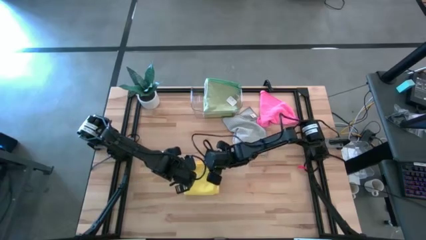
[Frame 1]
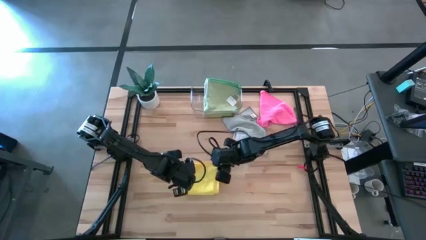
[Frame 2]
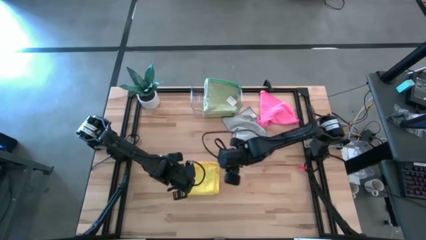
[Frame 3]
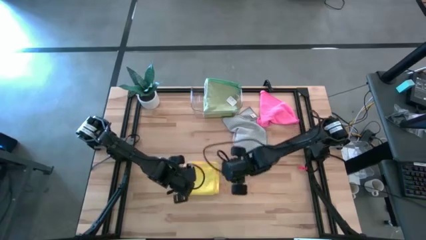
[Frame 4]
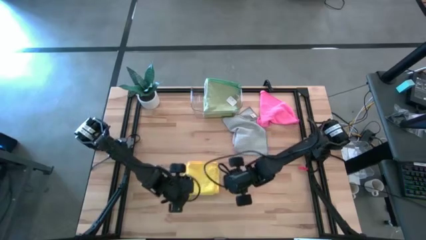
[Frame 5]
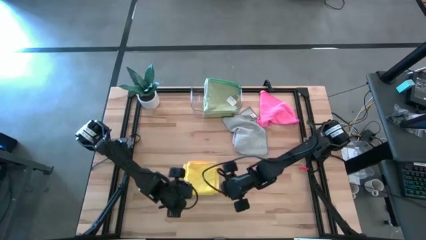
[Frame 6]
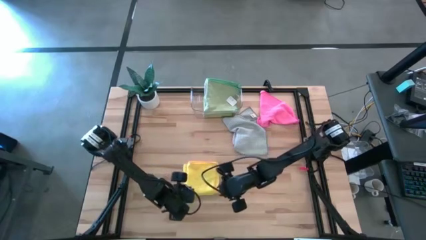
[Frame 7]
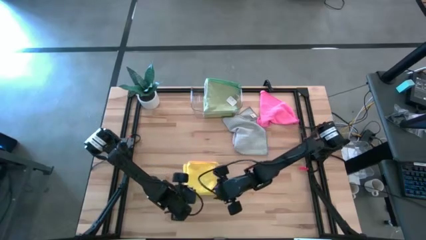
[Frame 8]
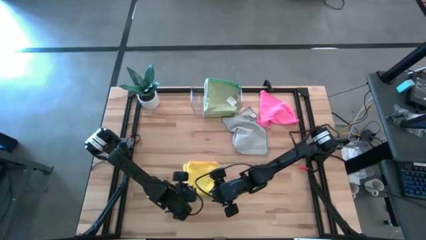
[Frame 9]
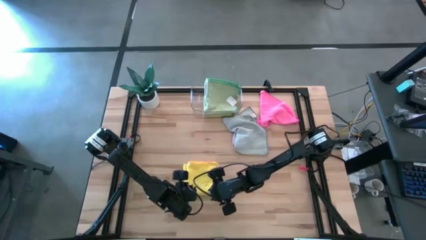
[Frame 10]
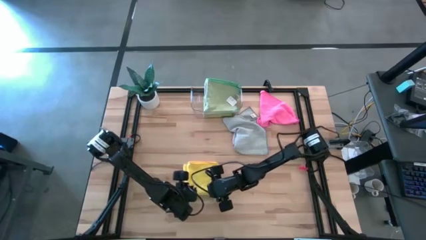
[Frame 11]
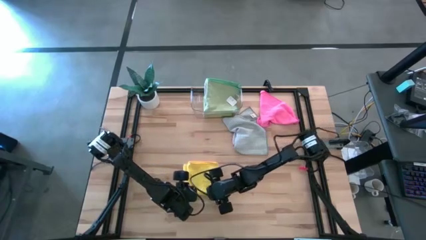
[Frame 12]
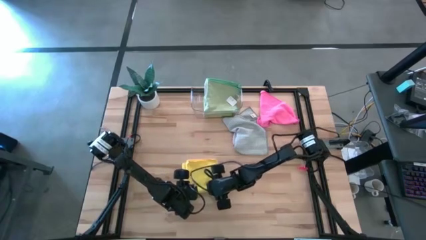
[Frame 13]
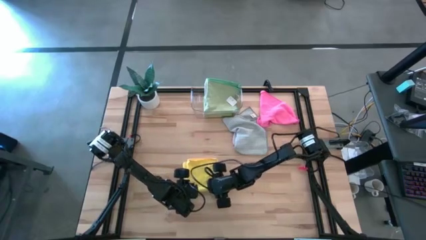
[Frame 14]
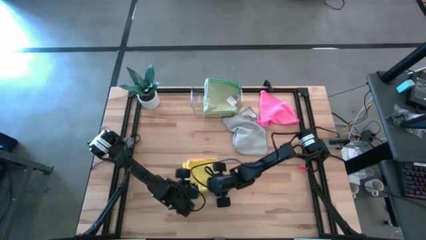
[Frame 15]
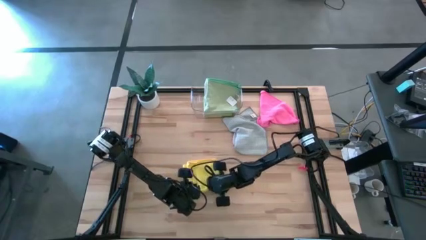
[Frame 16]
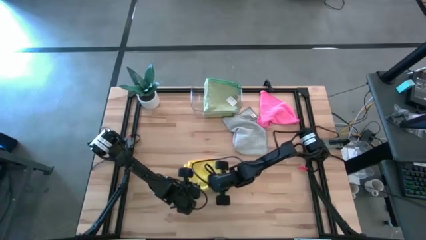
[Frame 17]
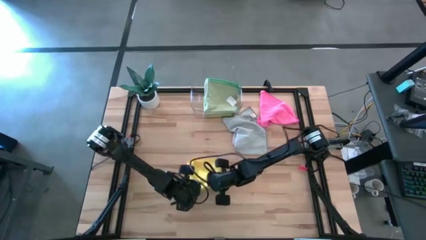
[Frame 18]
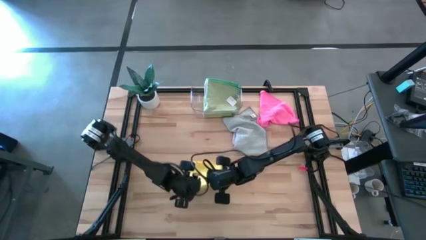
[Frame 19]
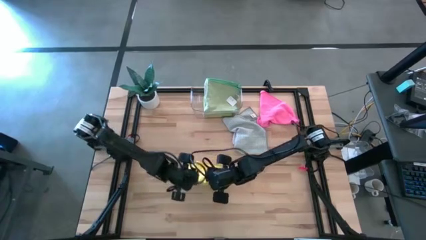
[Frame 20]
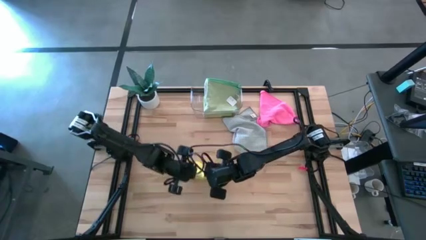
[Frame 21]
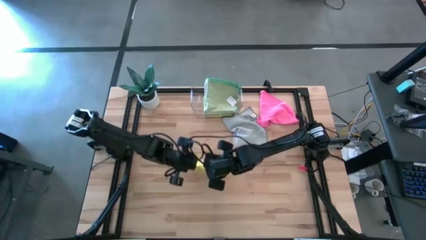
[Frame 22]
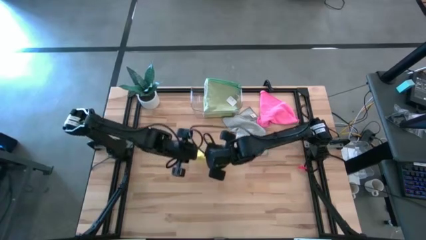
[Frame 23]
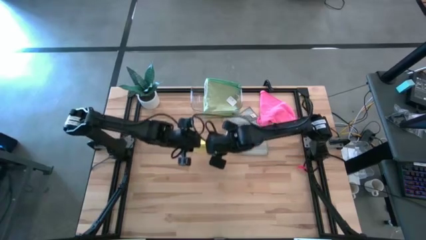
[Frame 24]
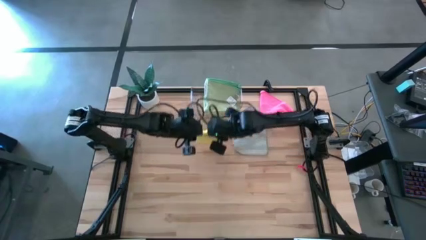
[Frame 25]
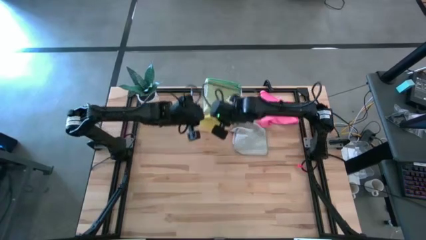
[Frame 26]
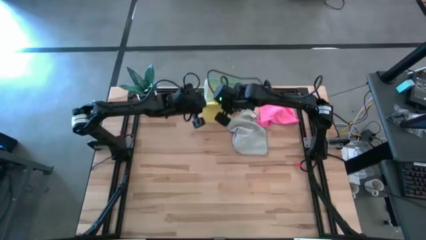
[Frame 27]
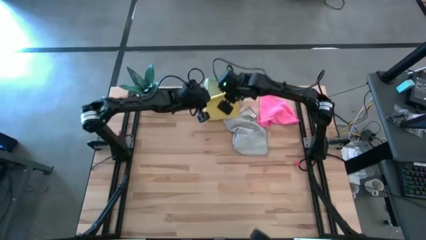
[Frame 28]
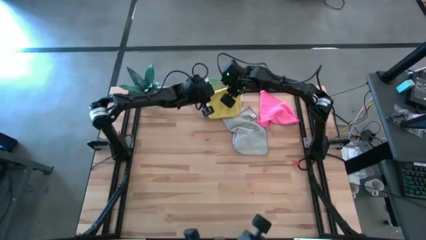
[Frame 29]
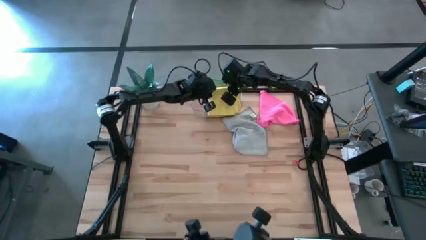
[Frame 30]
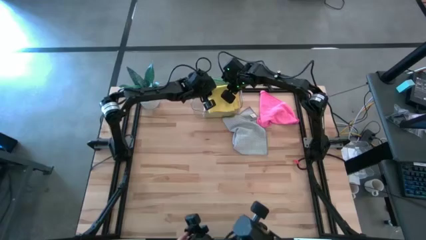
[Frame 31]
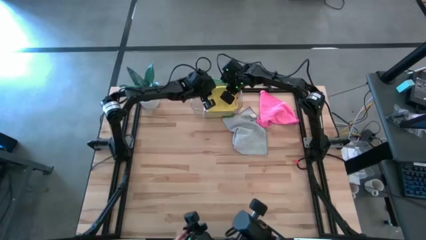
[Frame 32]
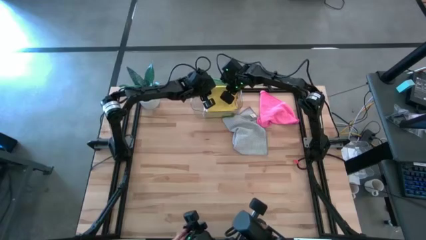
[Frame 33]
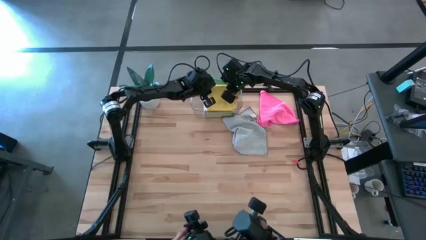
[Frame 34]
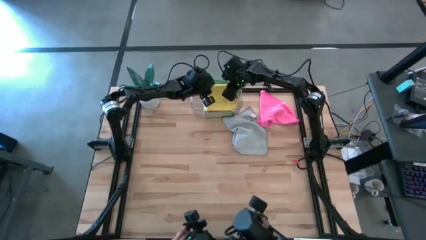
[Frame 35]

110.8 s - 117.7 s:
Task: Fold microfiber towels
Put the yellow microfiber cloth into the transparent bin

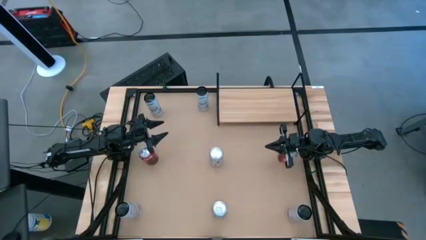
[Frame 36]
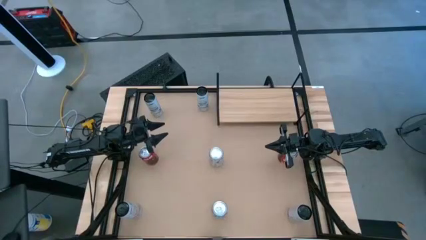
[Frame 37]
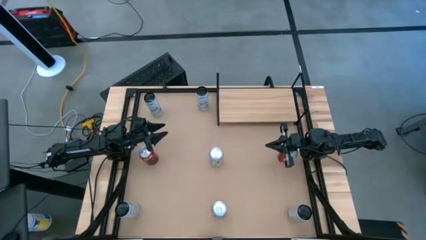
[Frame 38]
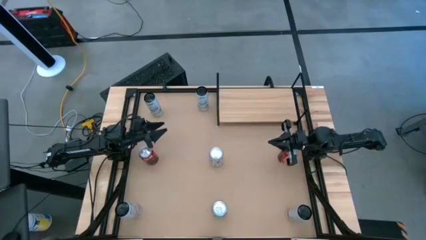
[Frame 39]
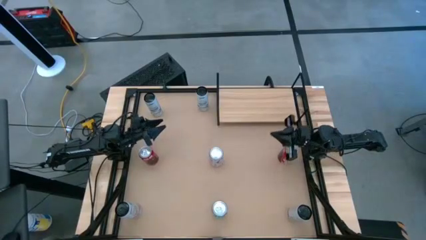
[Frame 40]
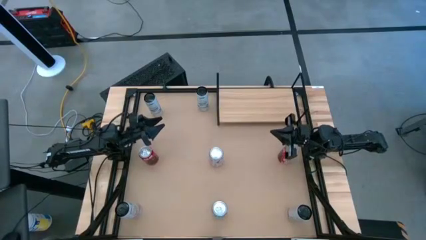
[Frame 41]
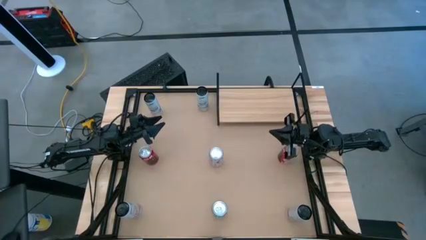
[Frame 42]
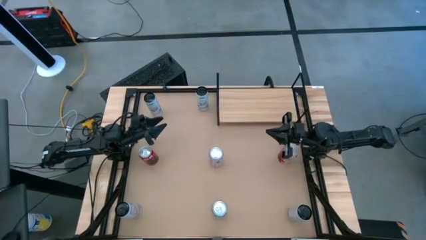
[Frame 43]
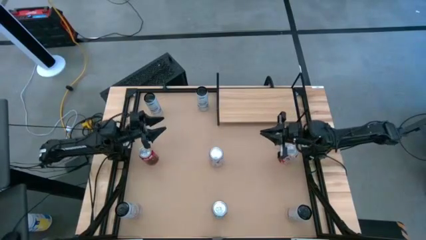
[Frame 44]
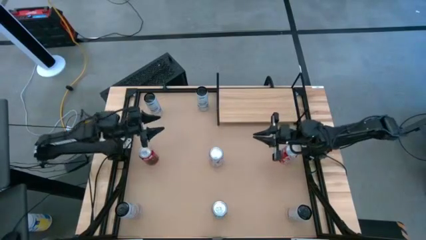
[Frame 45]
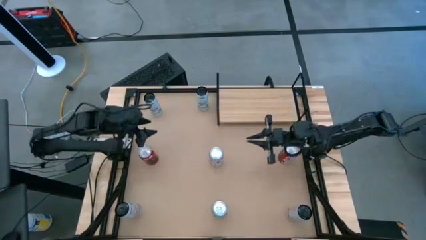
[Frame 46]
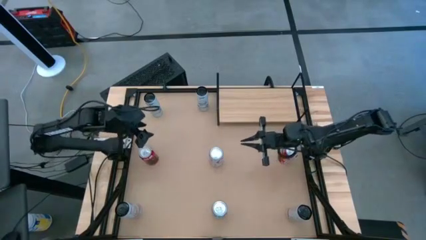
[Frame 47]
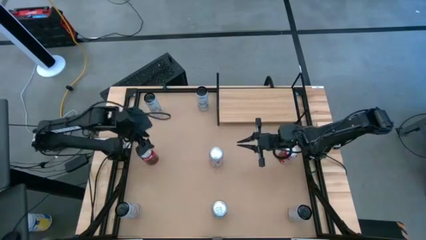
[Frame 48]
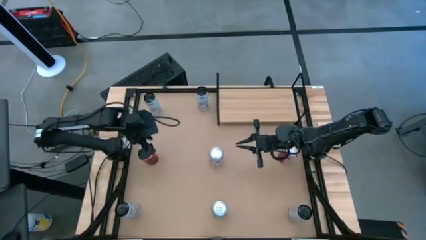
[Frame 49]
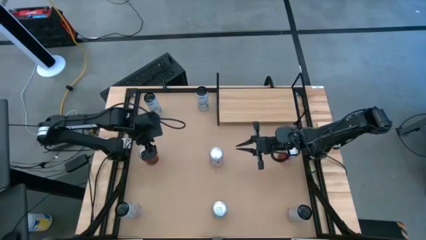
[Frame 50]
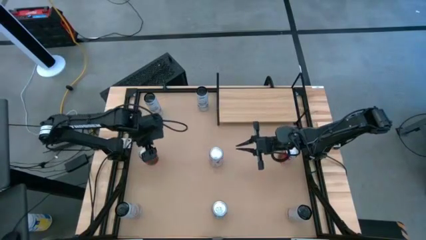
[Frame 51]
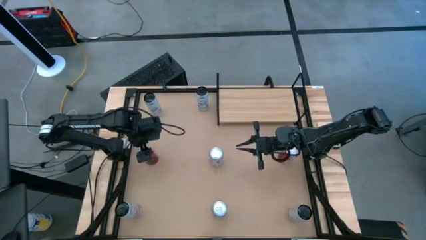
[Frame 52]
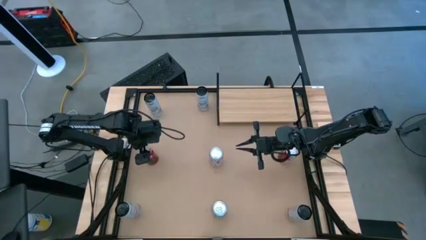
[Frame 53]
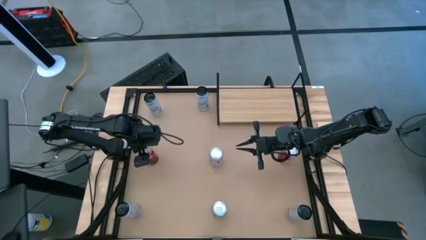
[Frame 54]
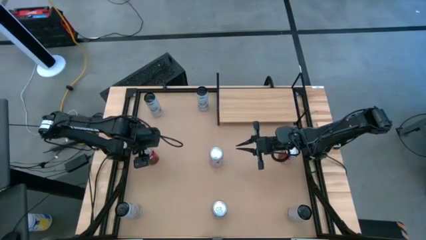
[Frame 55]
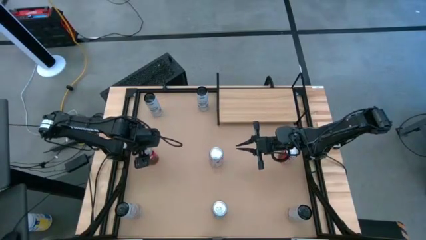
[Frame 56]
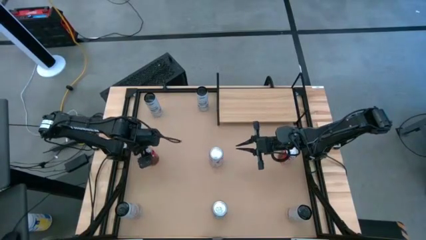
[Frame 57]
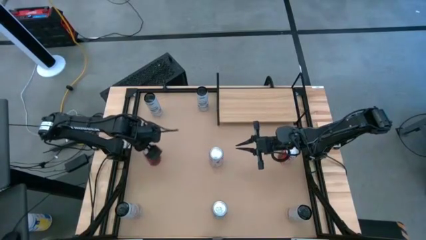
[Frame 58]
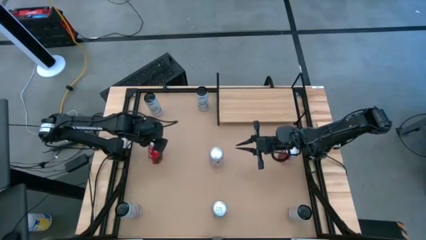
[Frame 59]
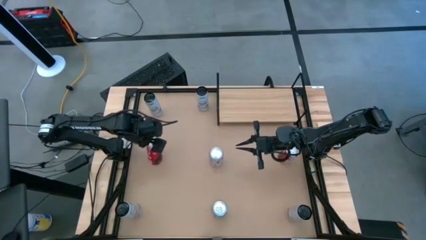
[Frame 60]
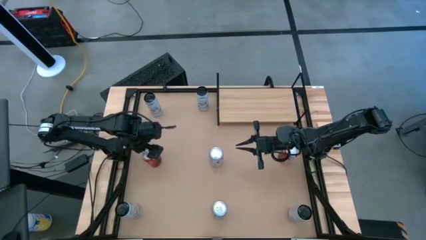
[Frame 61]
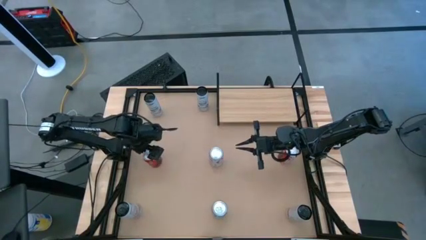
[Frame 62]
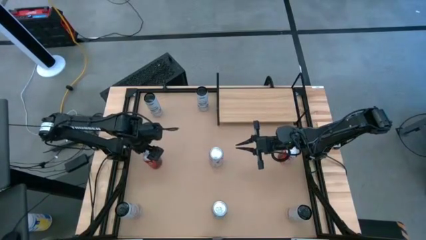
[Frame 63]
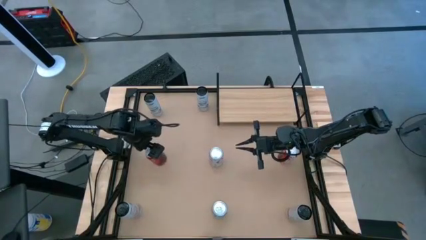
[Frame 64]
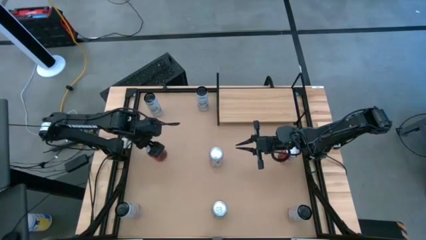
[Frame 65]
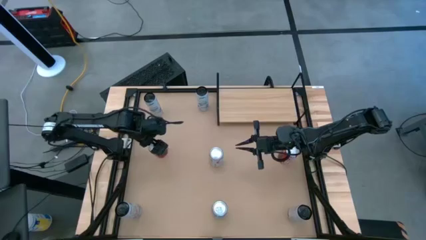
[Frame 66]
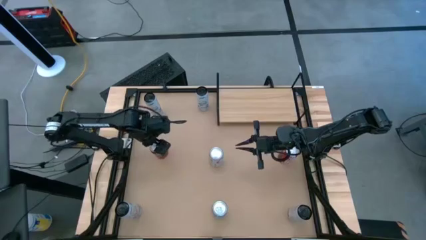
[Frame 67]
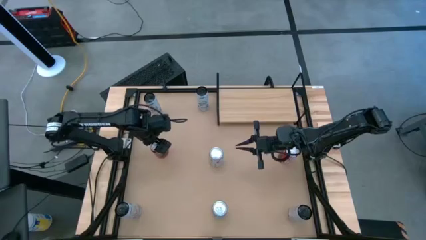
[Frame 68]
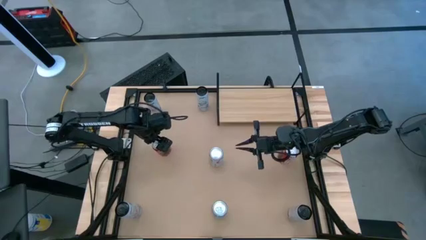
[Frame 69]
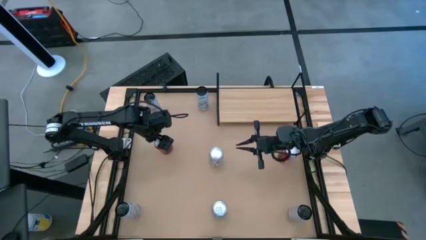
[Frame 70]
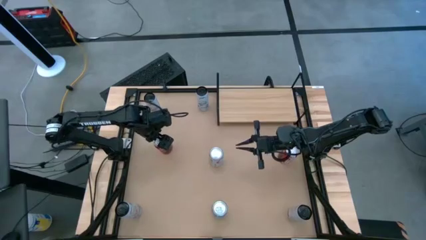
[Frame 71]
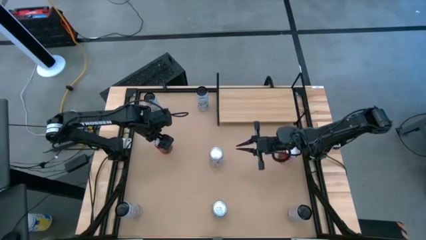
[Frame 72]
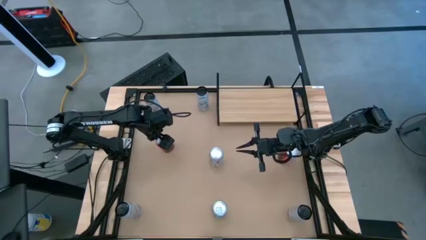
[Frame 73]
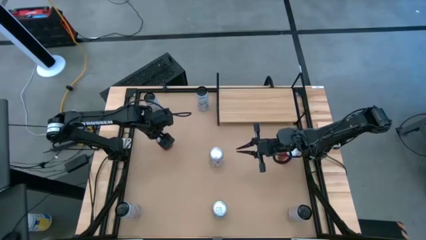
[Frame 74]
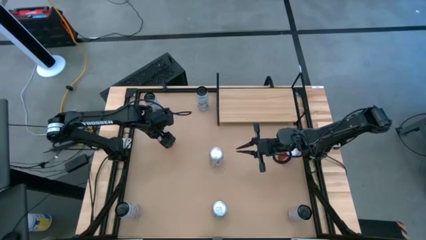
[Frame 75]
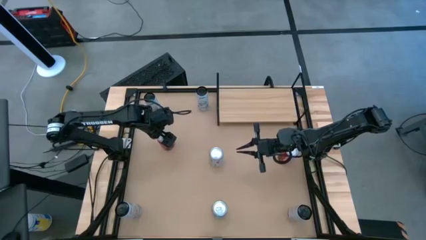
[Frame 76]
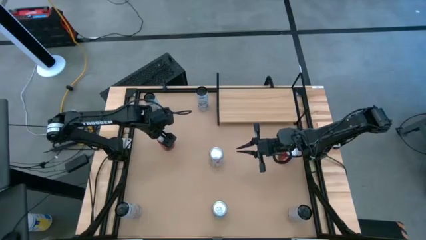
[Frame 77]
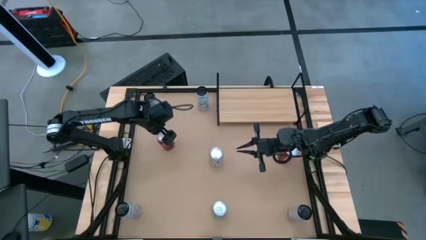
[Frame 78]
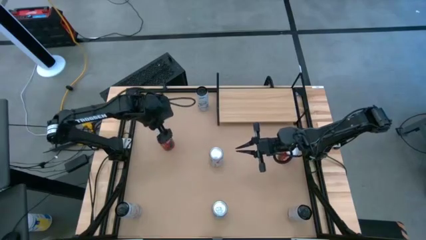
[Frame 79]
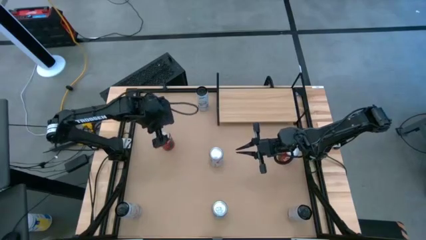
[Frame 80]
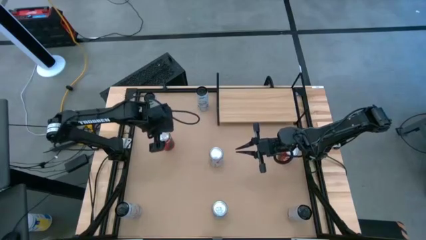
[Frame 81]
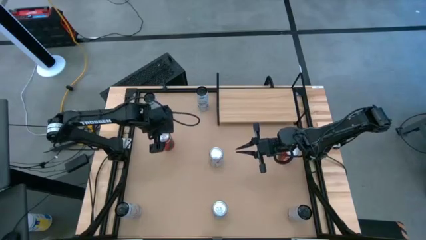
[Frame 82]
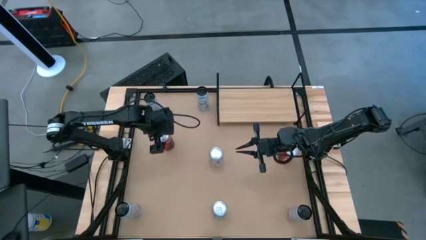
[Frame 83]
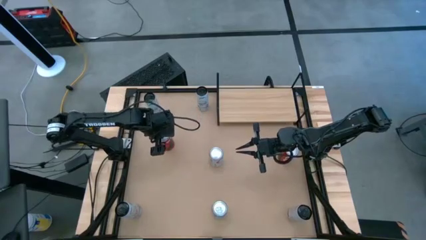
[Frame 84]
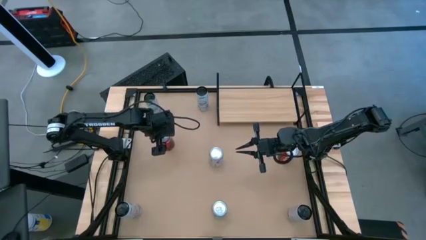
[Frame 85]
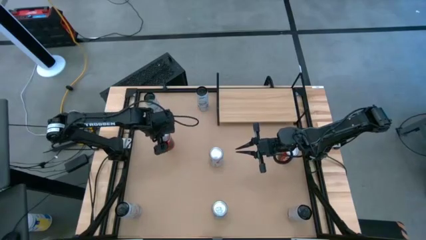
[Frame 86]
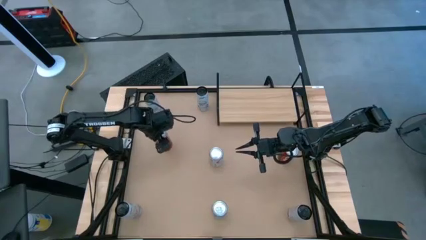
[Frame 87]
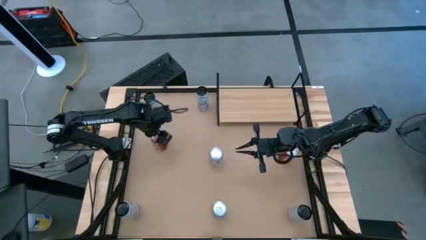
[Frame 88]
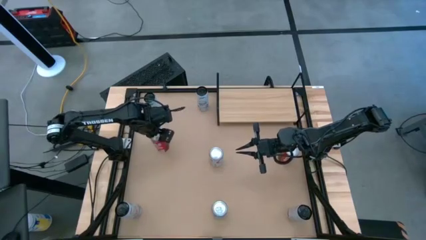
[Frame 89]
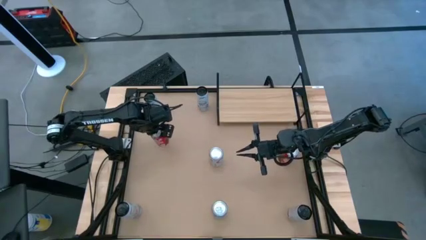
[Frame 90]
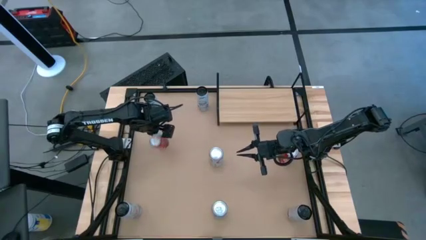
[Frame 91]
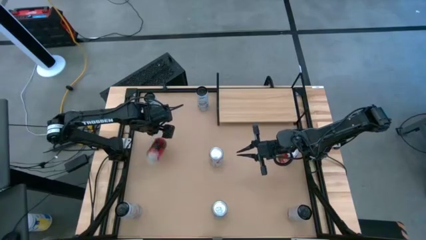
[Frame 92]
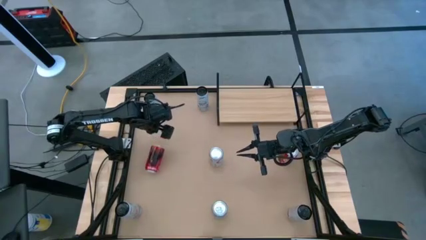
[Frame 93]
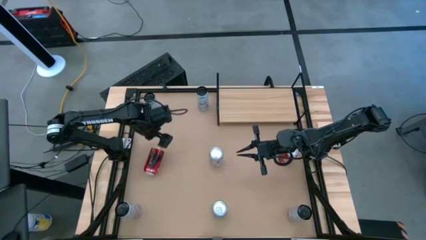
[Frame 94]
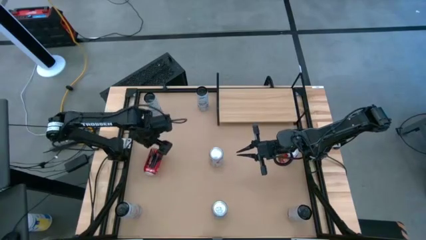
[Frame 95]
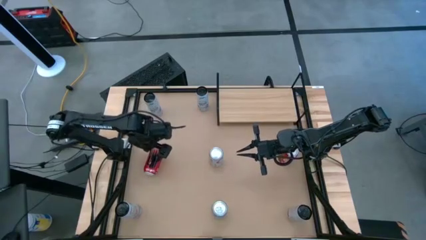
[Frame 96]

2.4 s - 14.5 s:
Task: Place canned beverage on shelf
Put the left red soda can on the shelf
